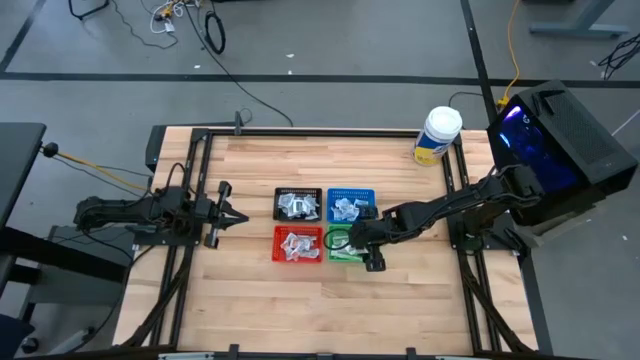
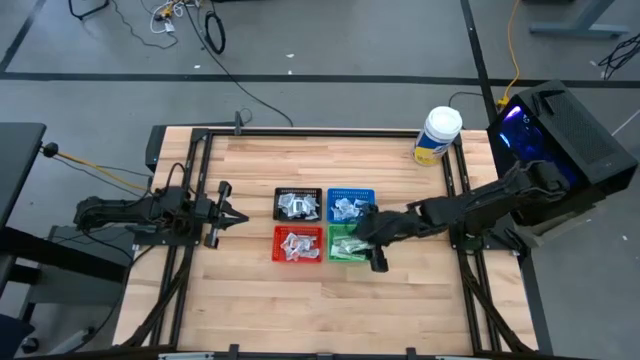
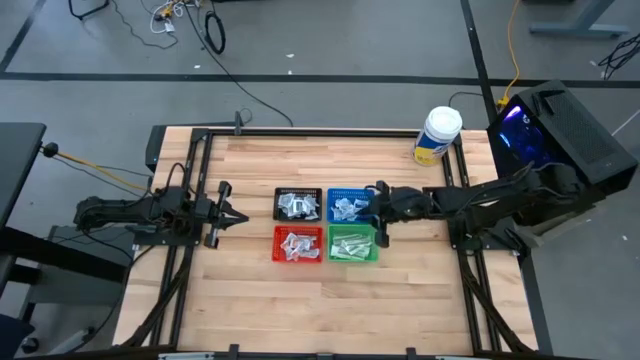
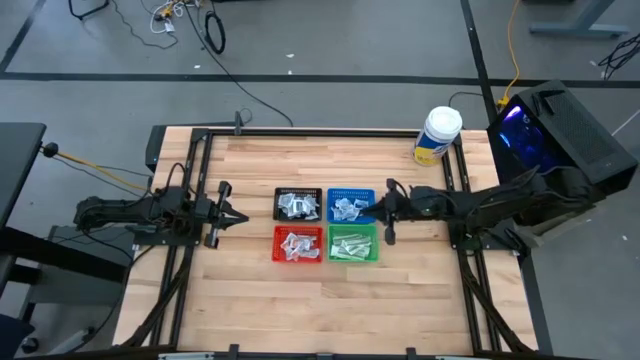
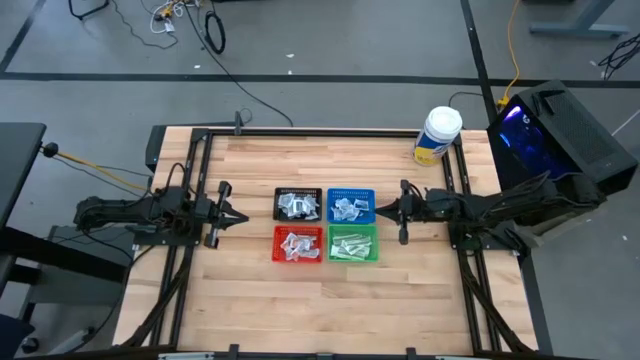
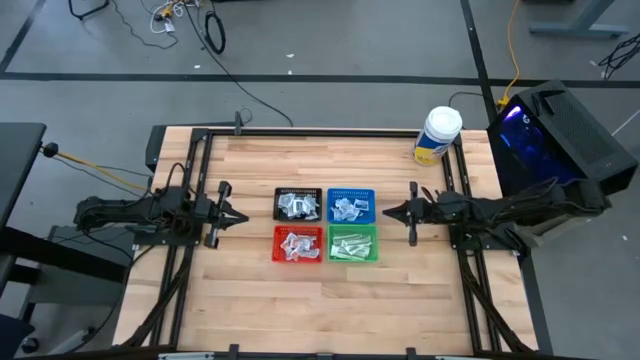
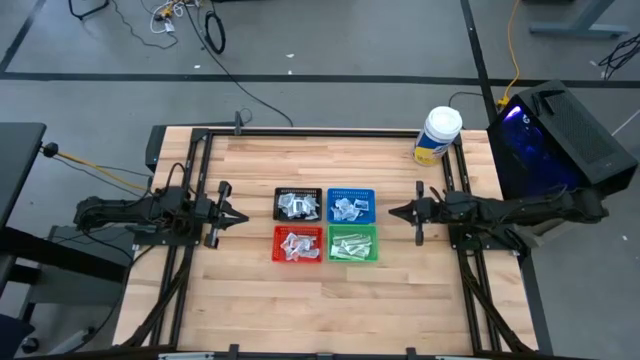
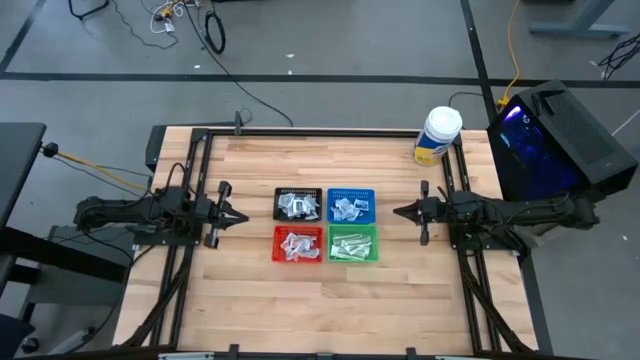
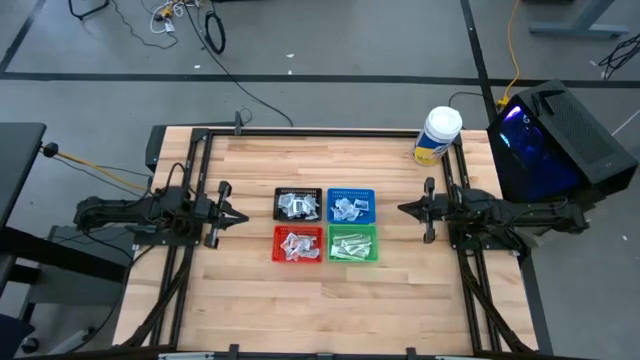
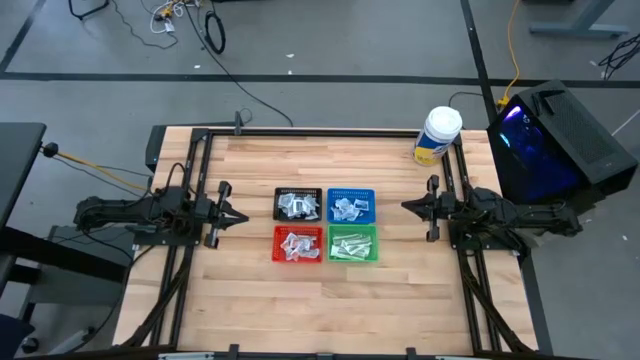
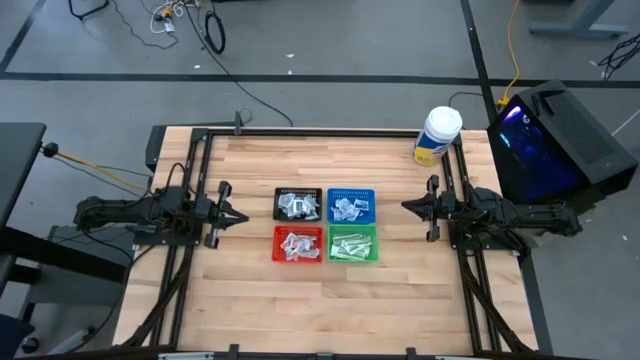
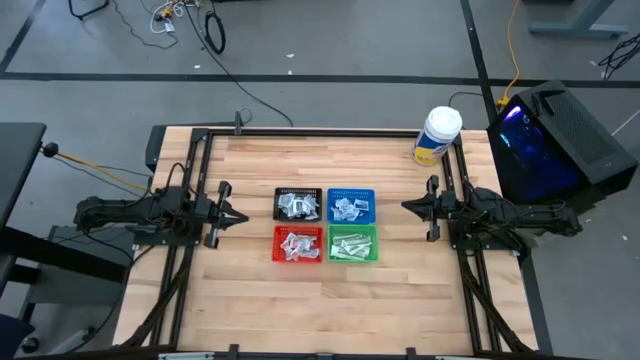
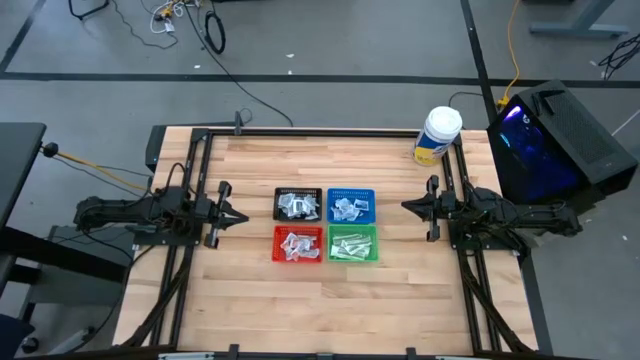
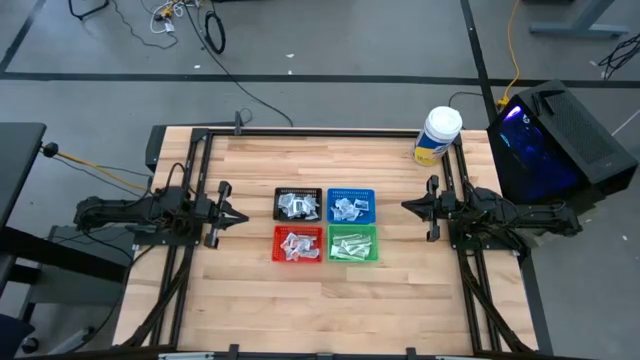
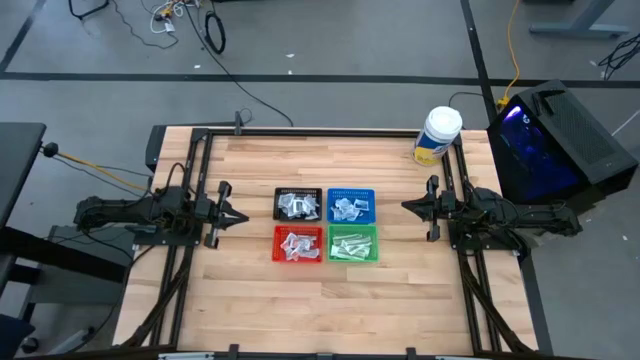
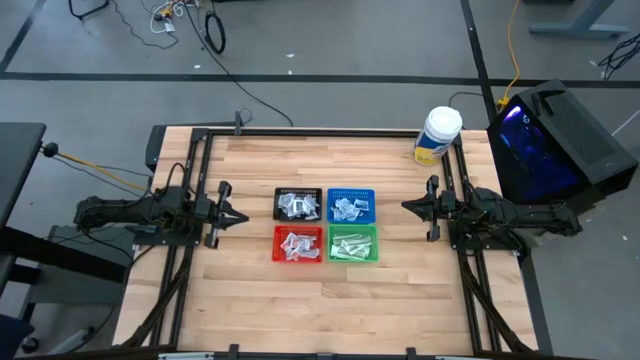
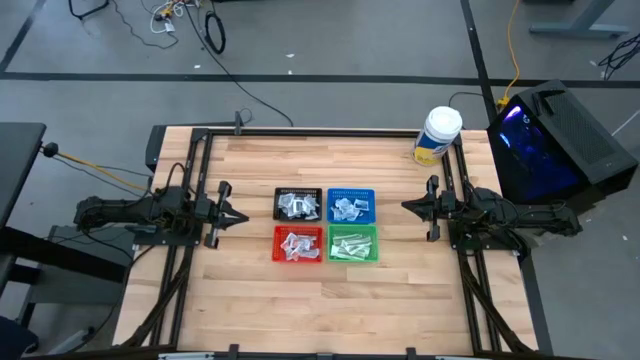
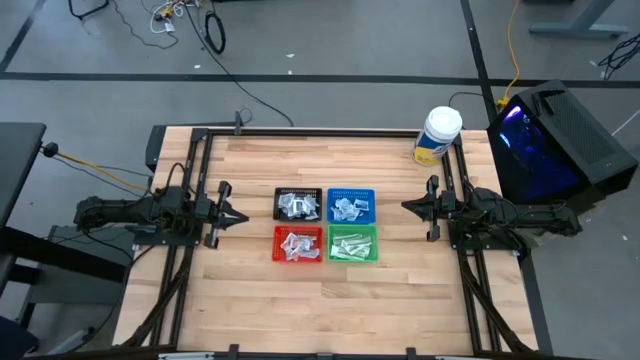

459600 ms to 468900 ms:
Task: Pick & Place First Aid Supplies
Return to Home Position

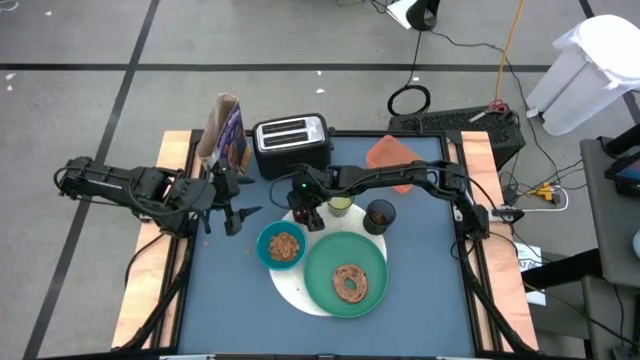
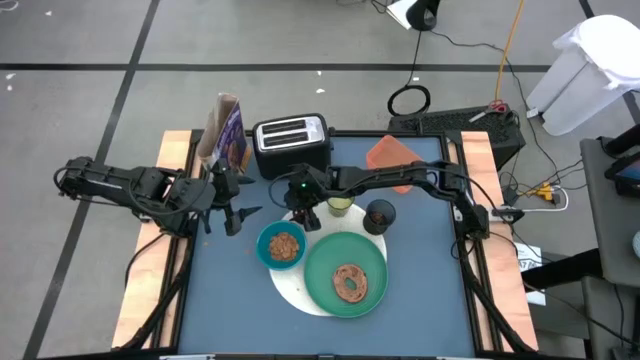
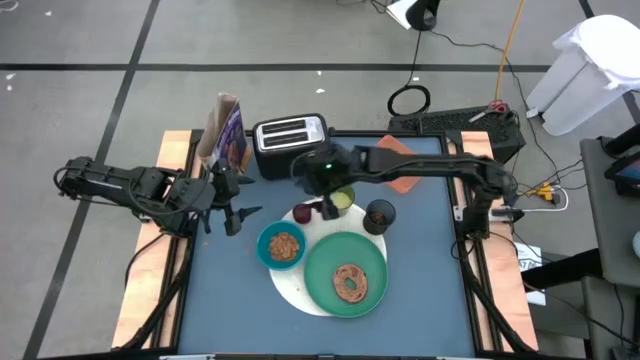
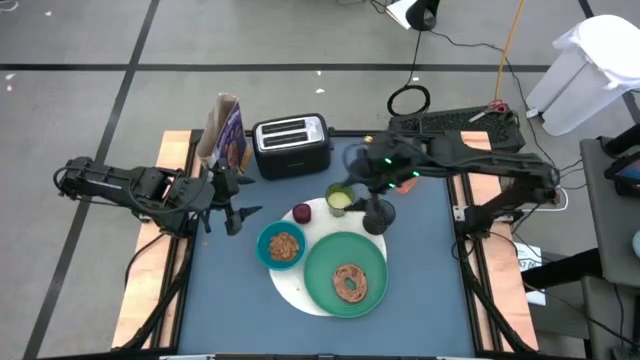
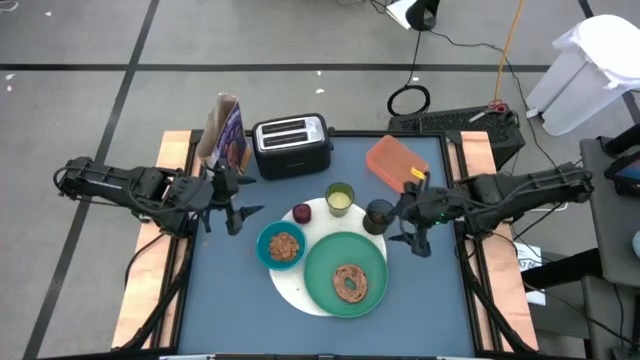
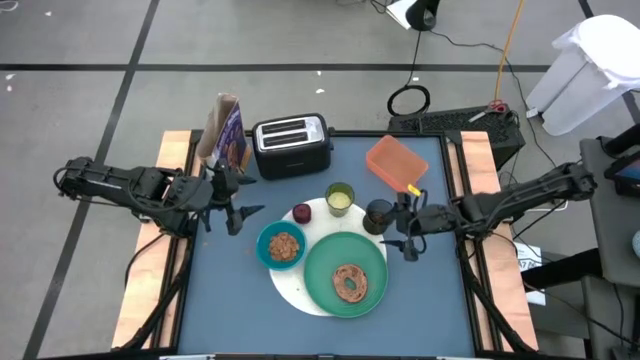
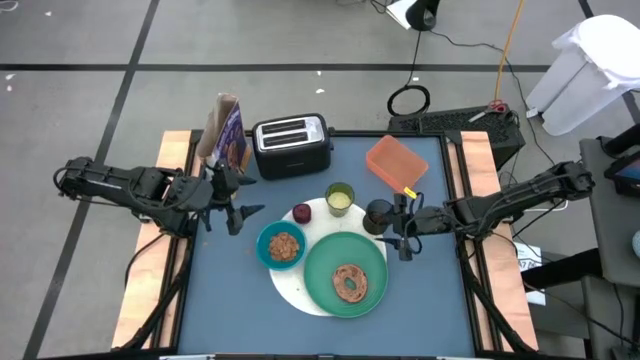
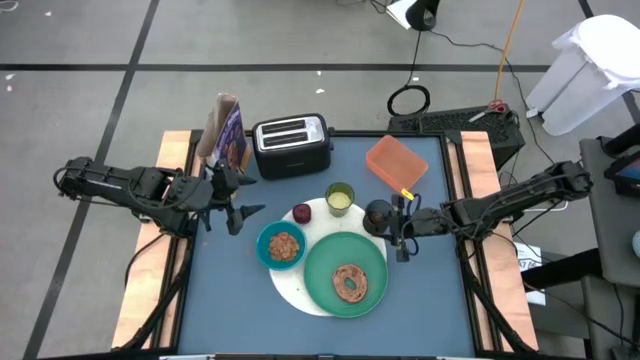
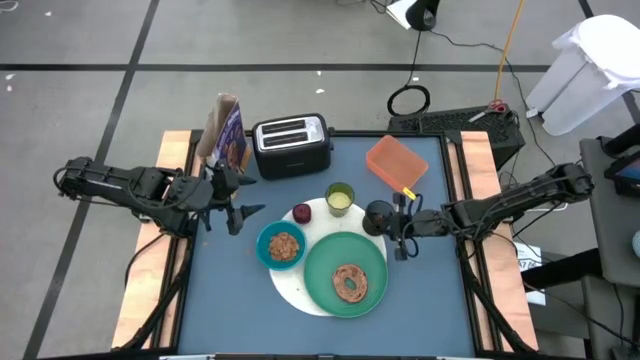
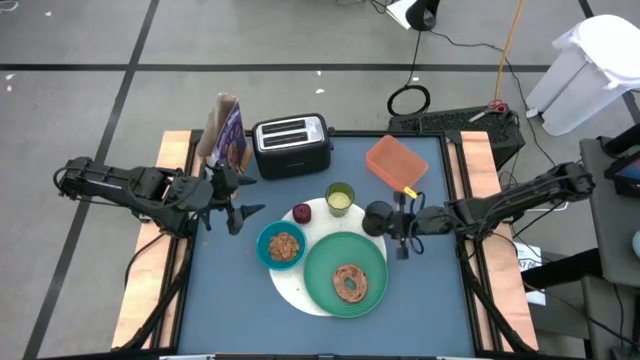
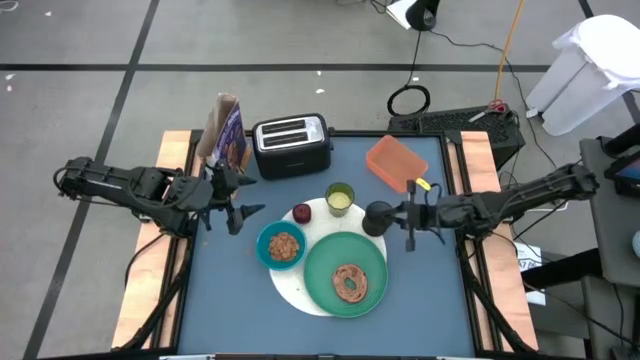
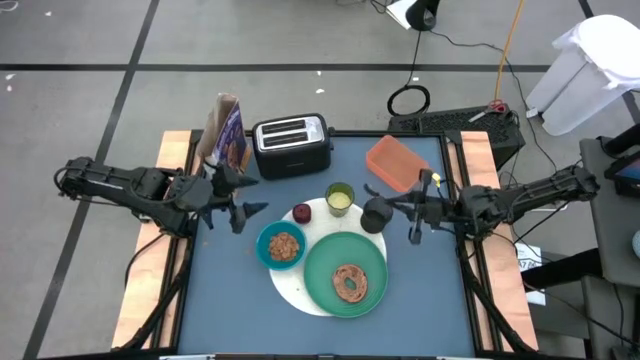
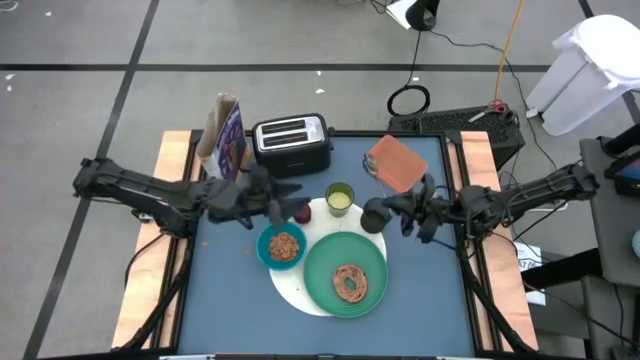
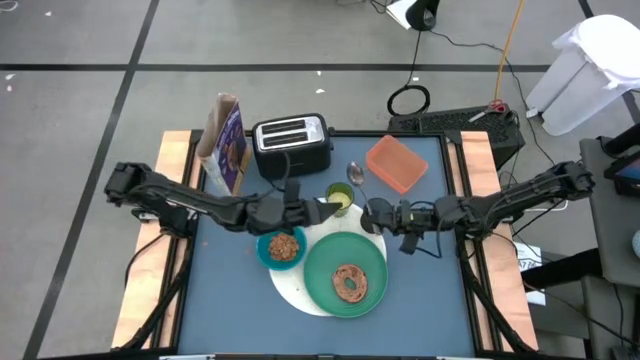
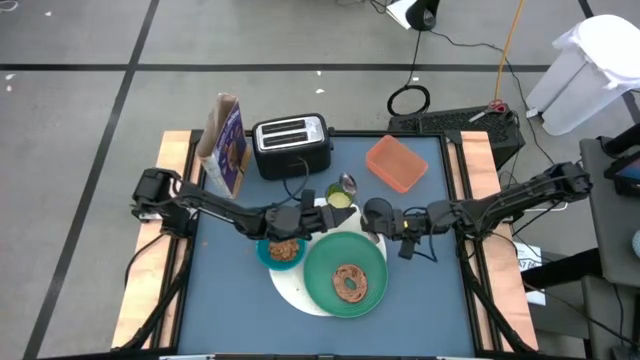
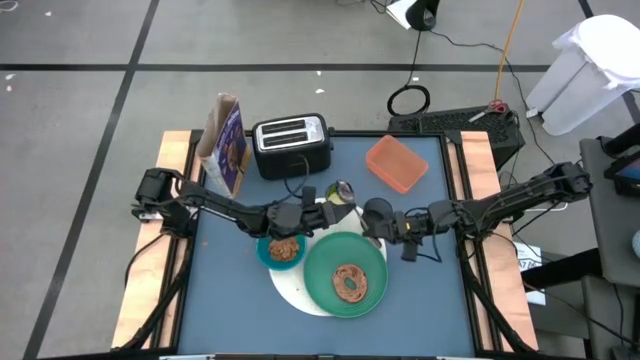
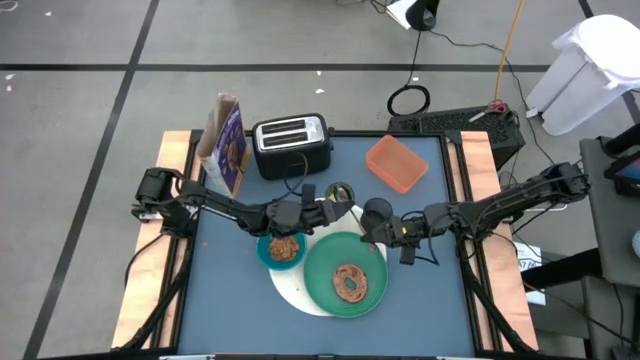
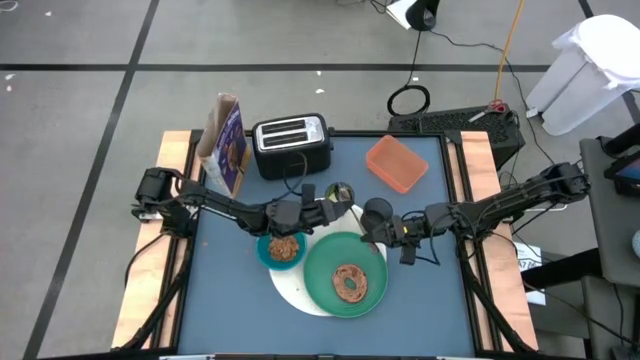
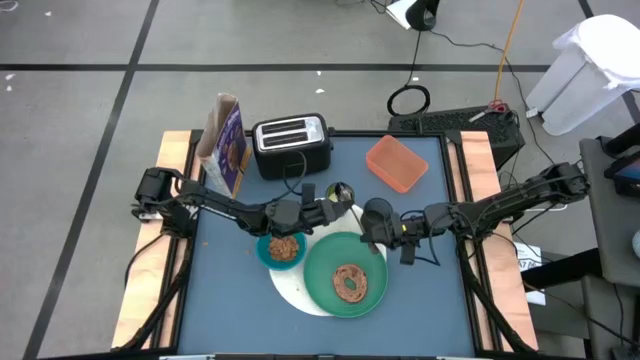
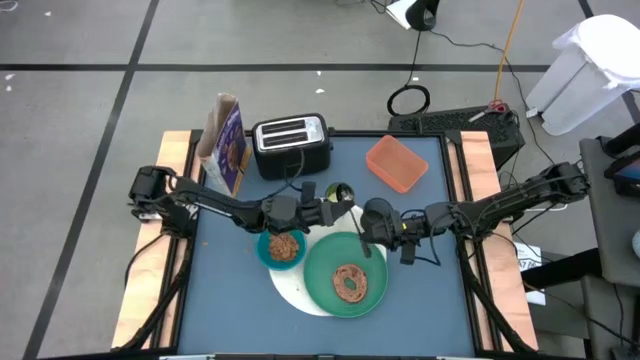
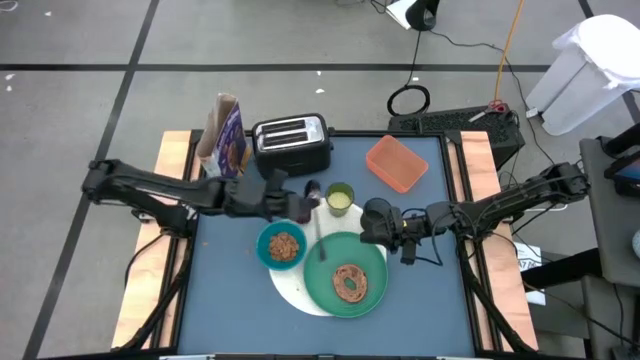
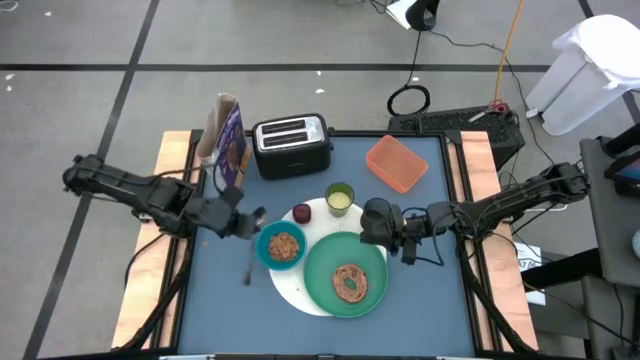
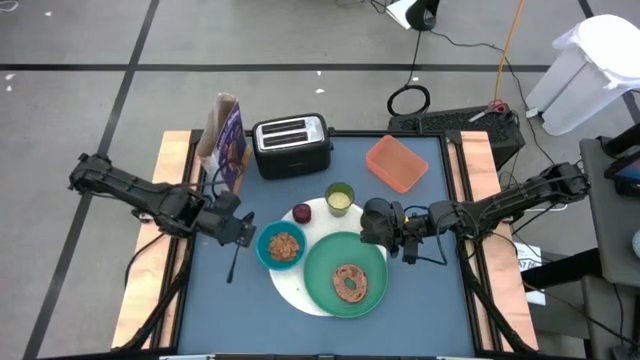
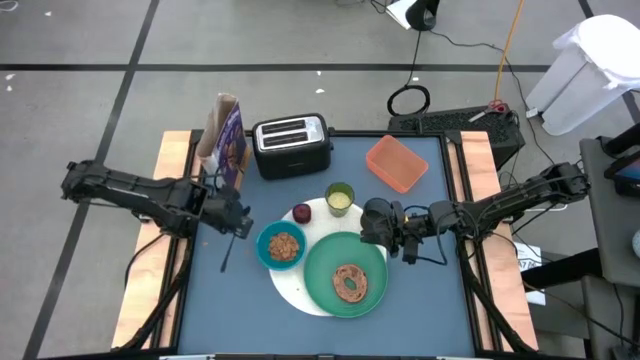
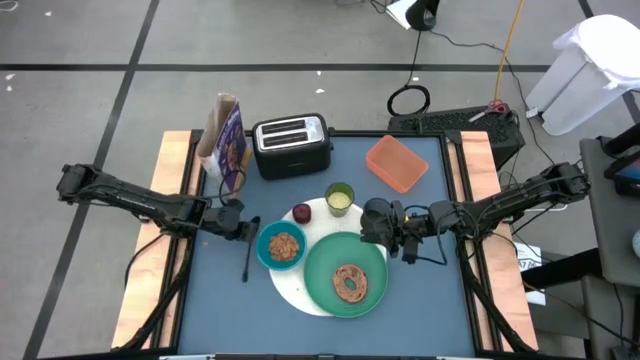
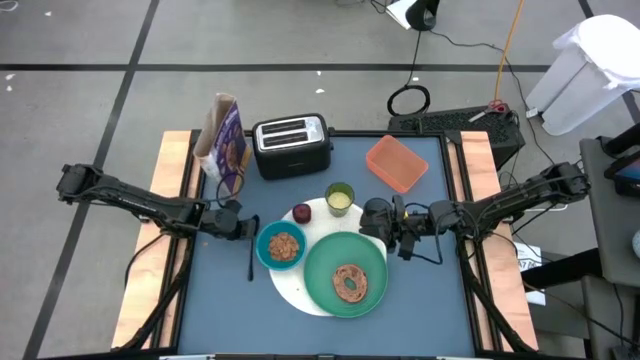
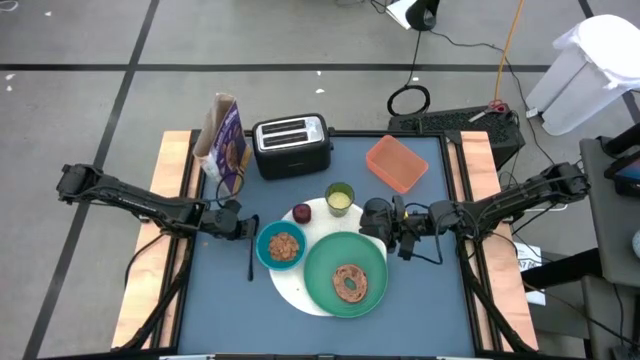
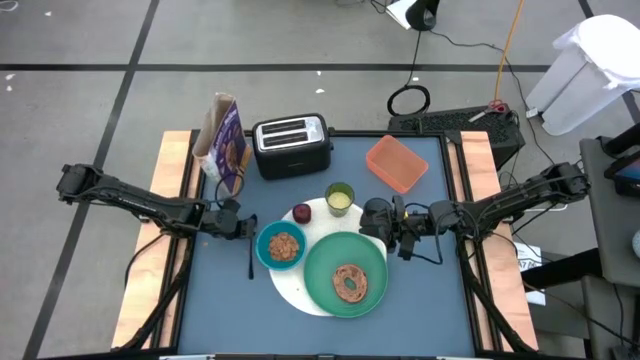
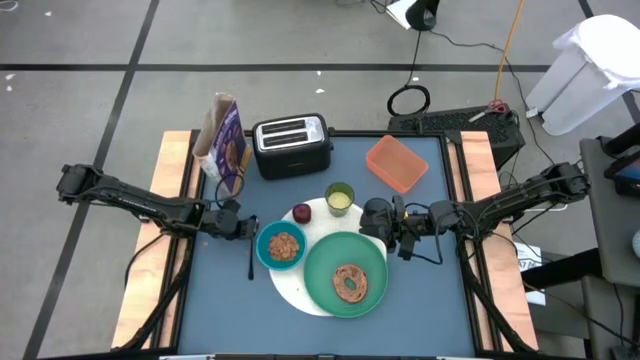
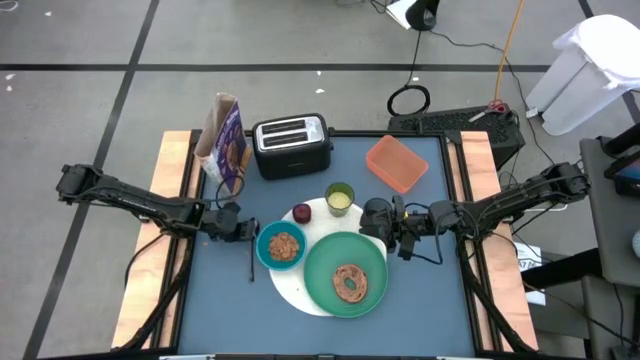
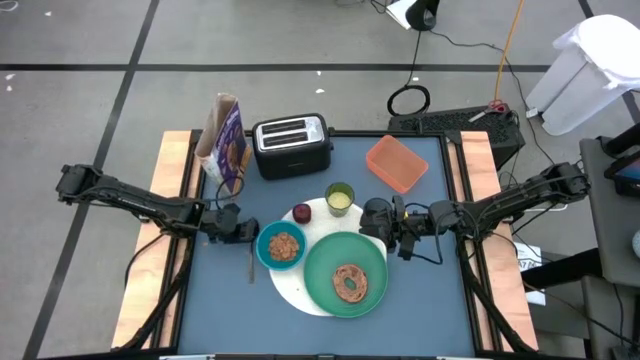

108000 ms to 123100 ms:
Task: Arrange a breakfast setting
Move the black spoon to the middle left of the table
